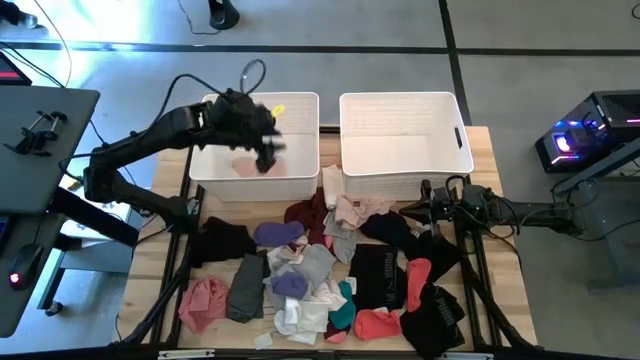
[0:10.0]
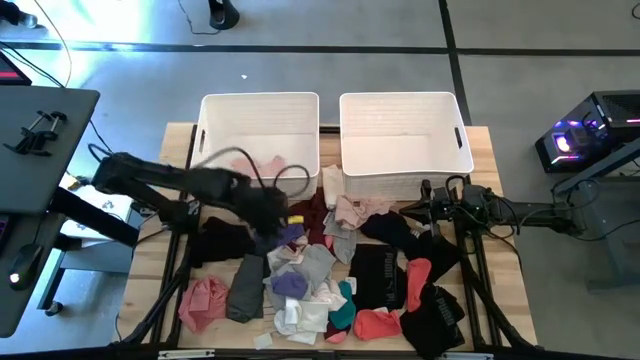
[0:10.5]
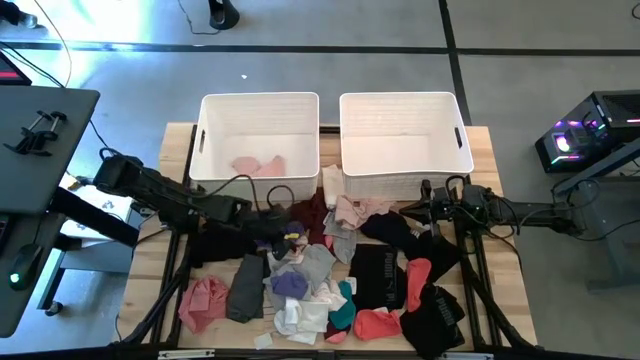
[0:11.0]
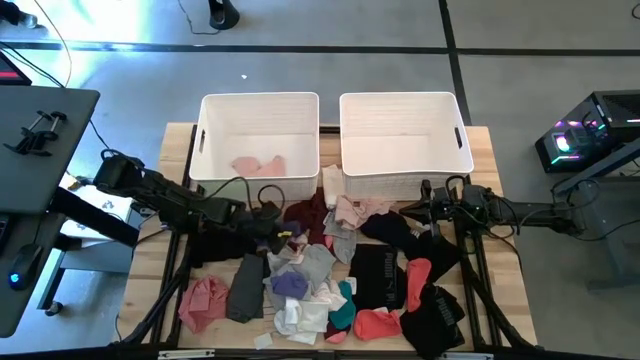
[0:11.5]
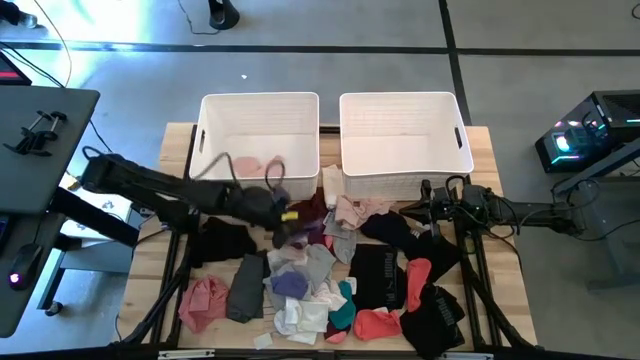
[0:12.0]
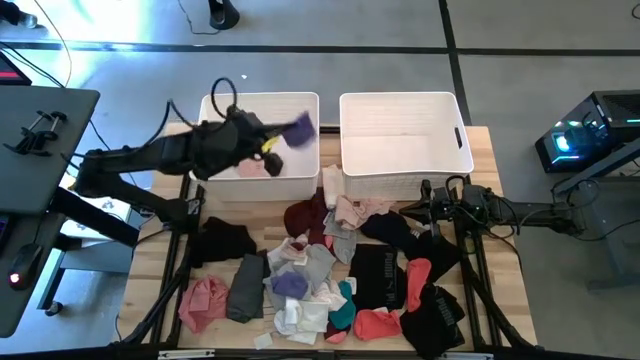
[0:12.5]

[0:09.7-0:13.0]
Task: Sort clothes
Put the purple sock into the left white laundry bin

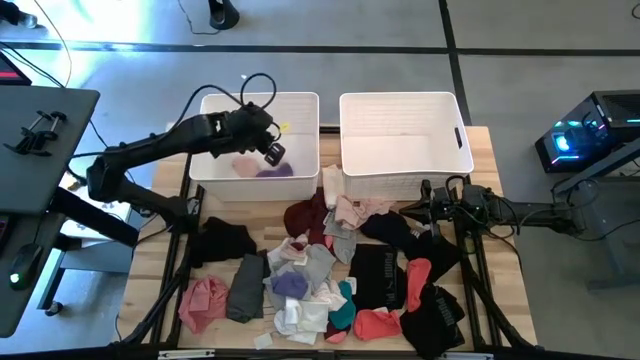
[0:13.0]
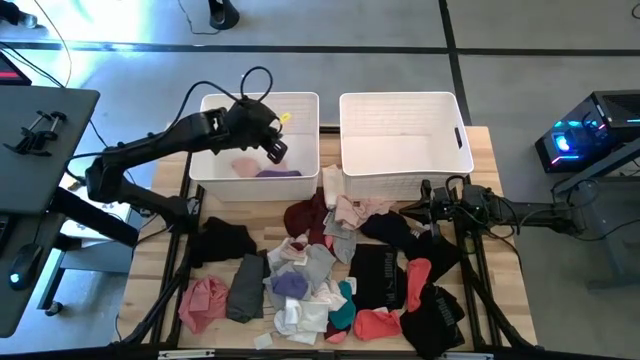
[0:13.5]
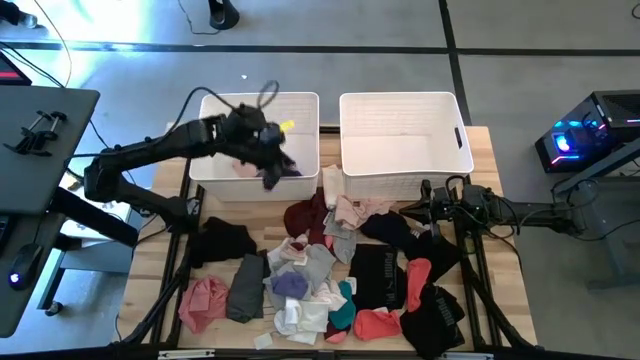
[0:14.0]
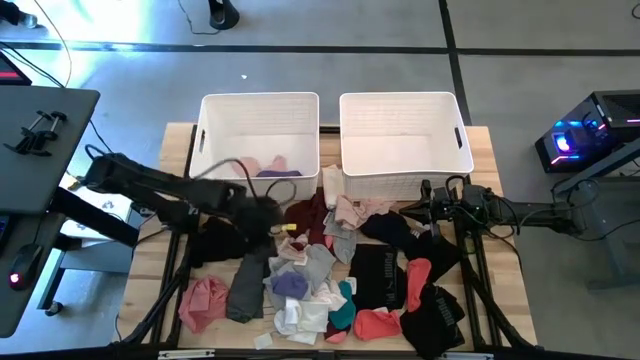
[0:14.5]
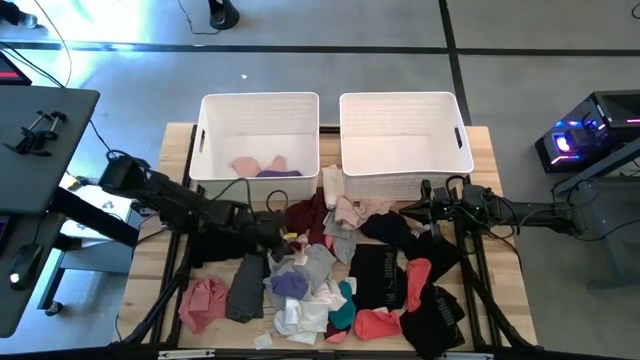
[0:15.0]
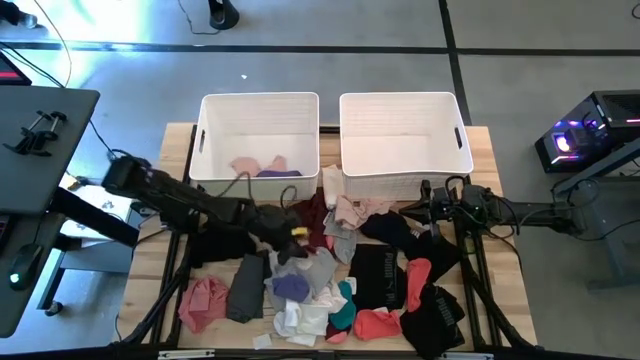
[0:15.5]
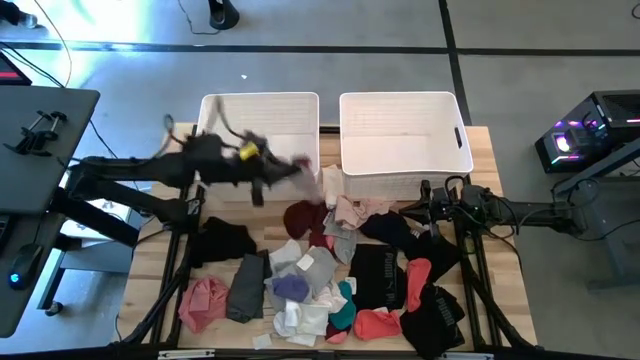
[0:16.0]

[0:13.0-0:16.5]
Put the white red striped sock into the left white laundry bin

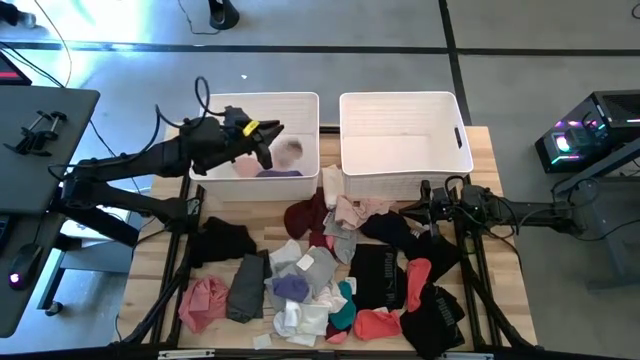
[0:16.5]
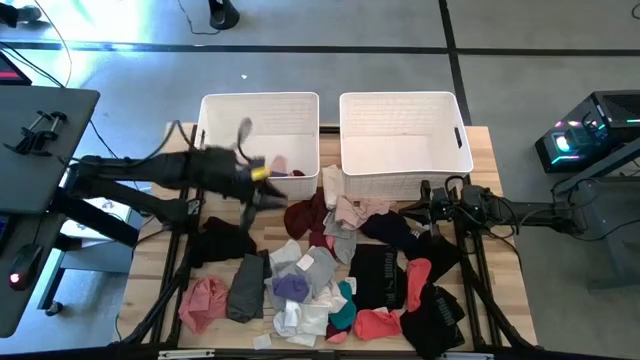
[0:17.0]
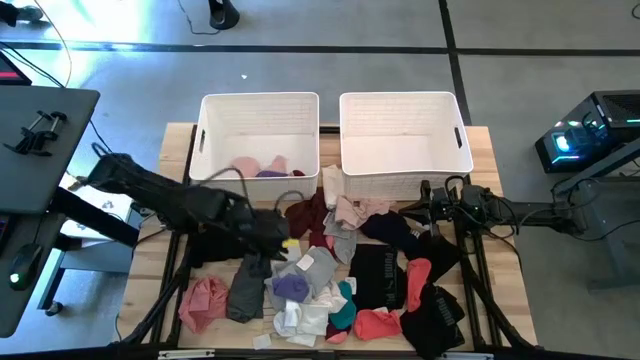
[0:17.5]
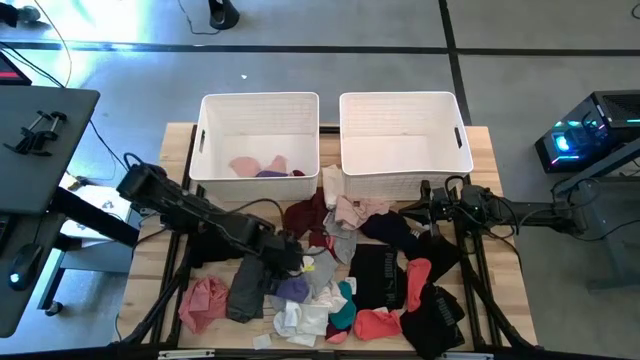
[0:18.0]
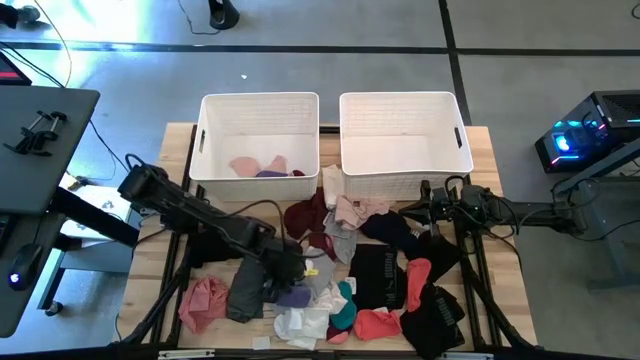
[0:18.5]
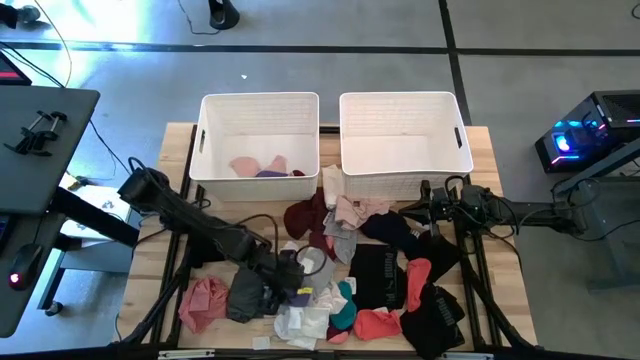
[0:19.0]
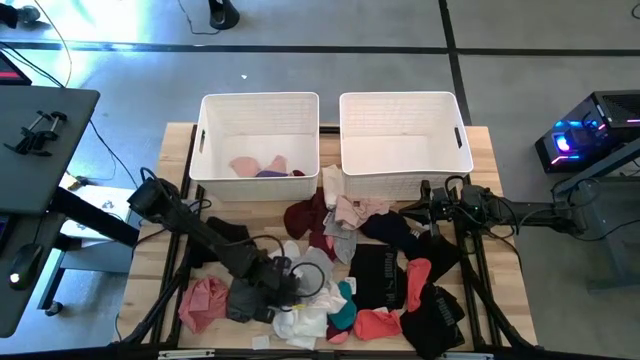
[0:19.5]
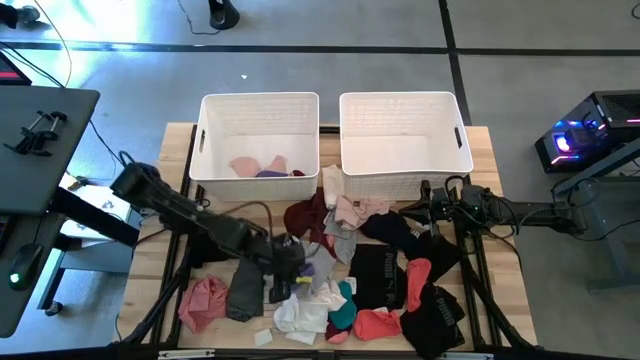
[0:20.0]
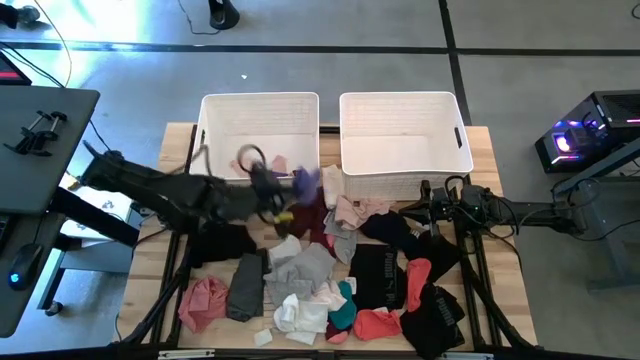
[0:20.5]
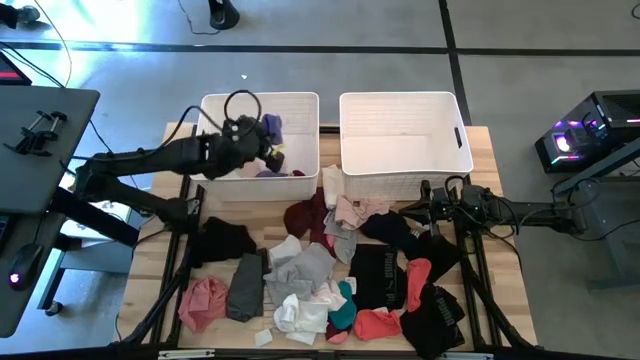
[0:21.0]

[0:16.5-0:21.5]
Put the purple sock into the left white laundry bin

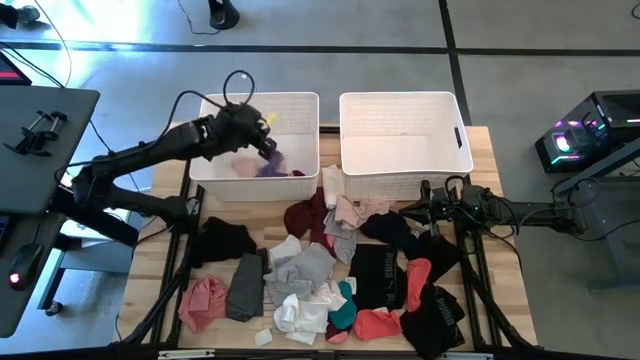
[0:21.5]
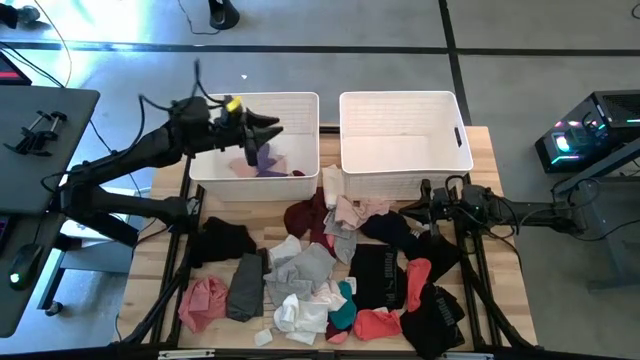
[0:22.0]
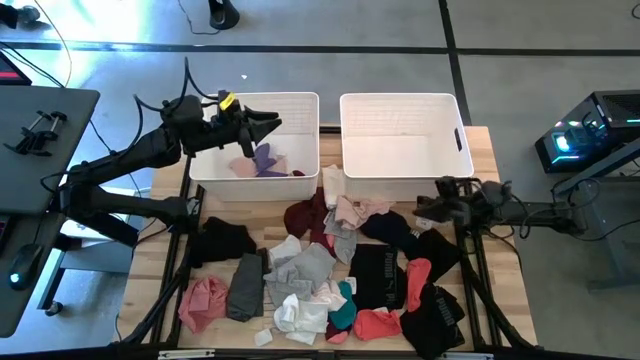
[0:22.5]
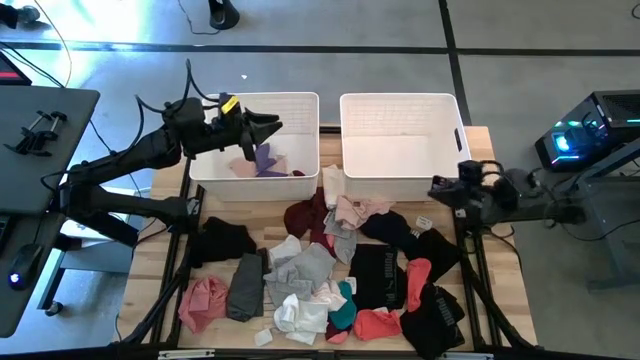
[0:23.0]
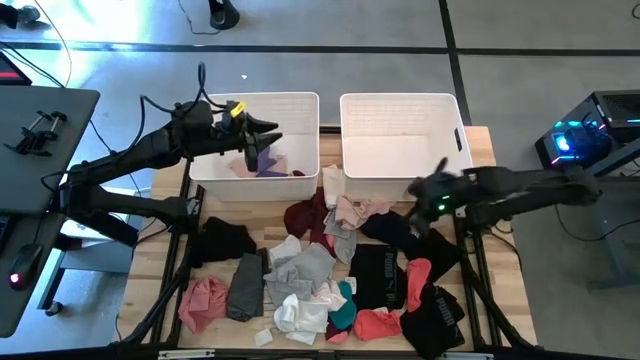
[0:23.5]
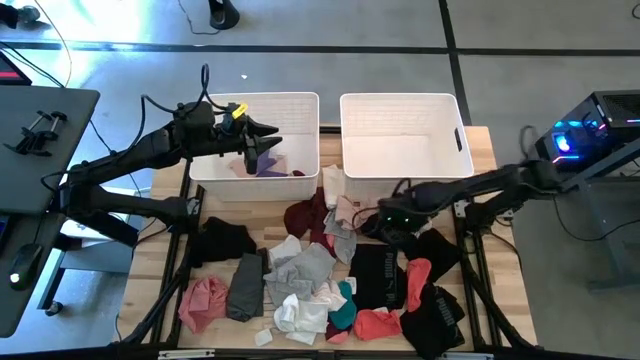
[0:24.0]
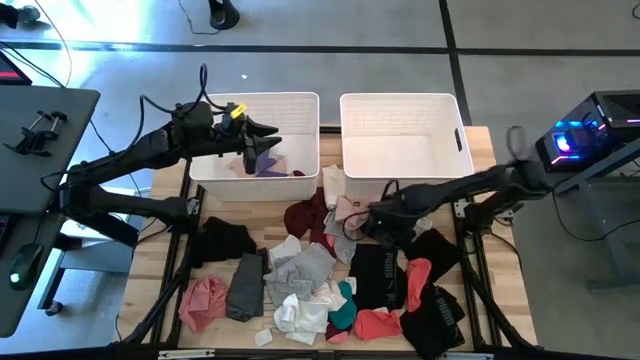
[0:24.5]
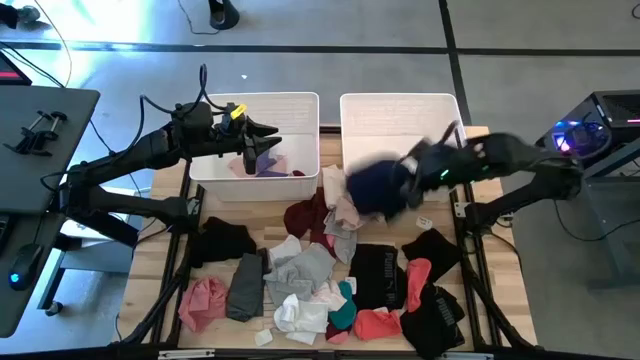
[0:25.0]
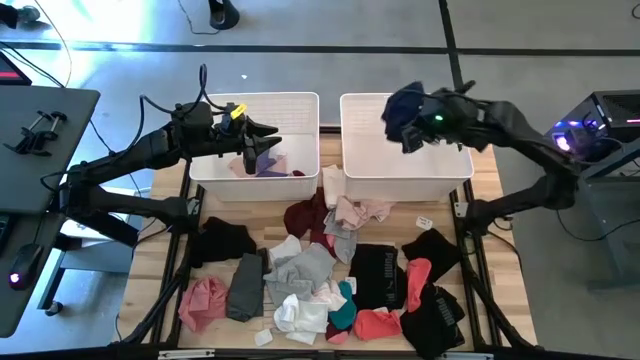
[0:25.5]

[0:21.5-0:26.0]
Put the dark blue underwear into the right white laundry bin

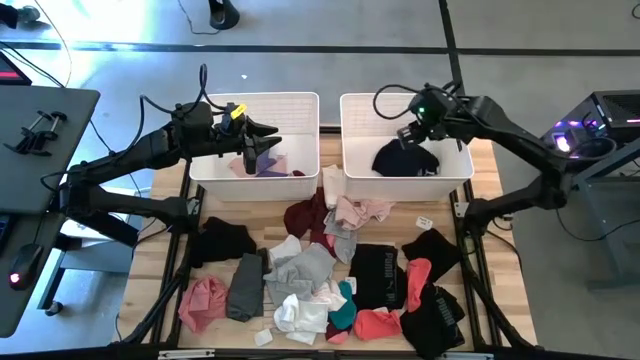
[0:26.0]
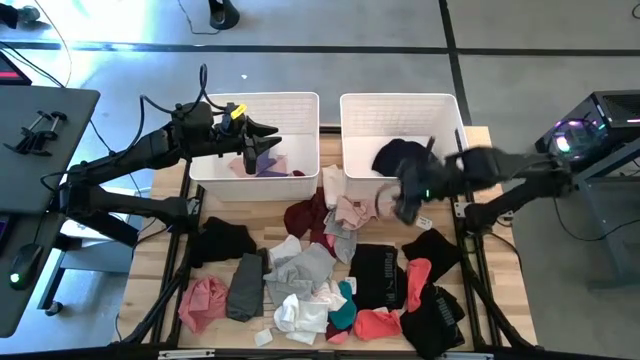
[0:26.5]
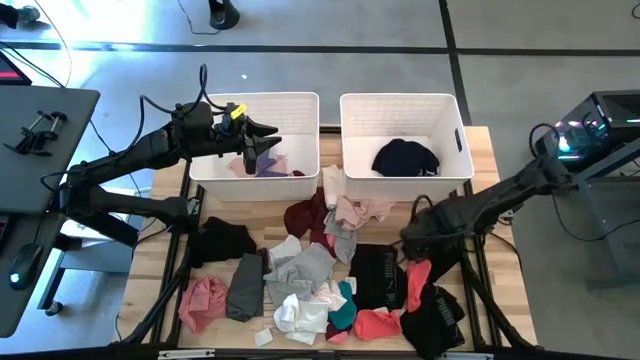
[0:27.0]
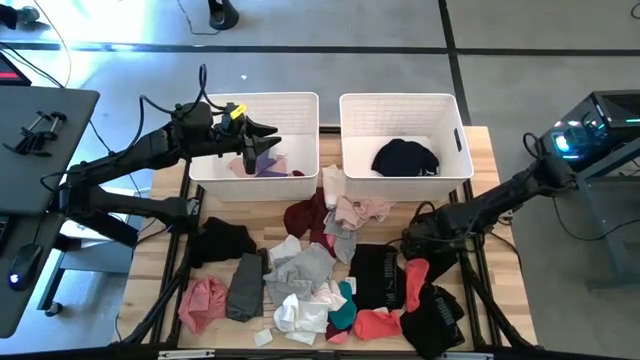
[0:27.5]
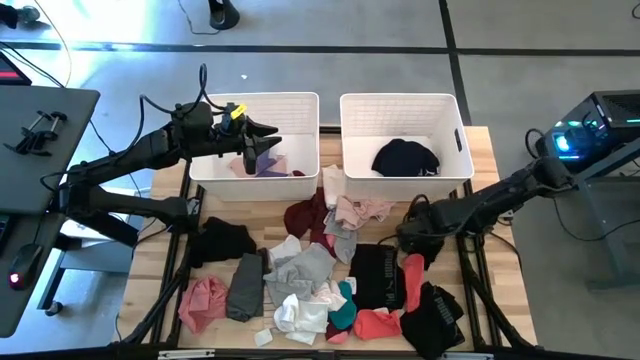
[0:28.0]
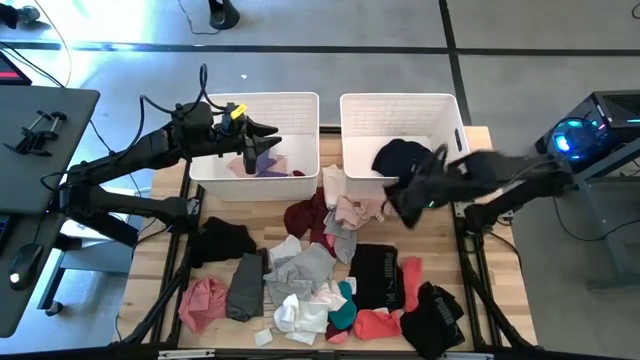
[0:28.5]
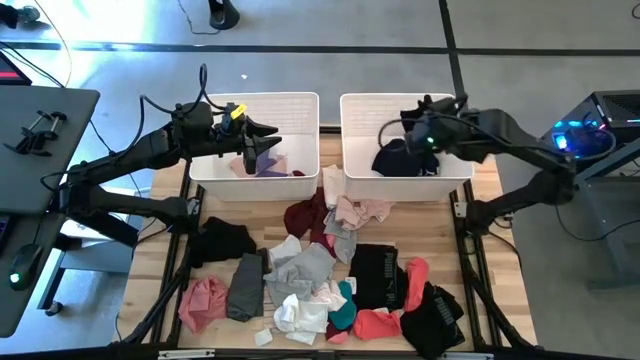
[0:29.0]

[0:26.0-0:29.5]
Put the black underwear into the right white laundry bin
